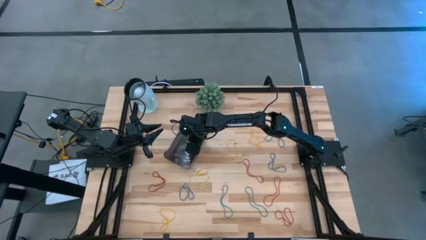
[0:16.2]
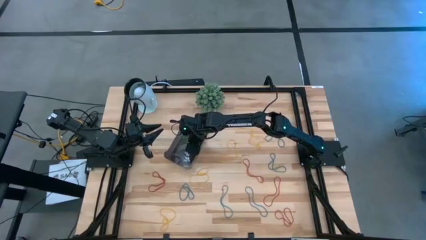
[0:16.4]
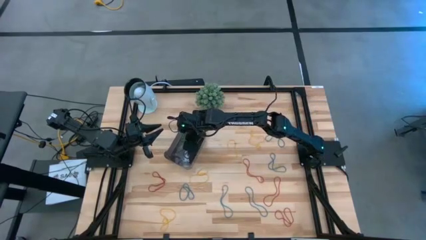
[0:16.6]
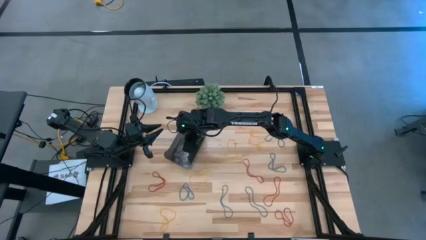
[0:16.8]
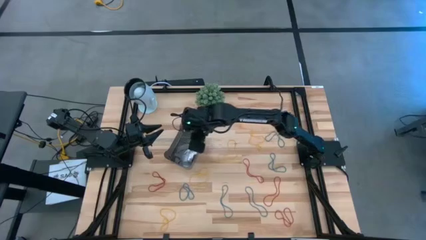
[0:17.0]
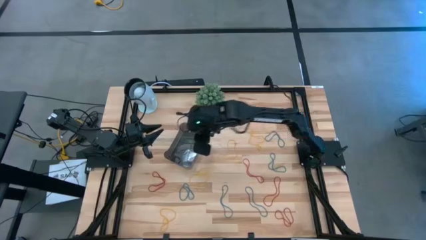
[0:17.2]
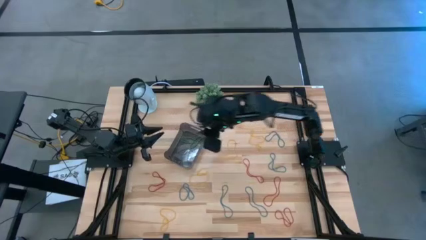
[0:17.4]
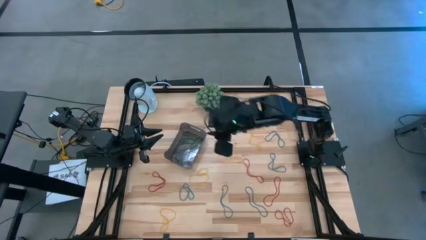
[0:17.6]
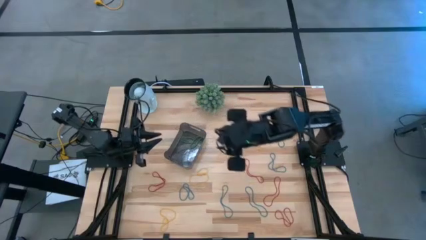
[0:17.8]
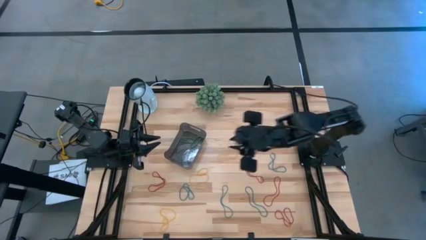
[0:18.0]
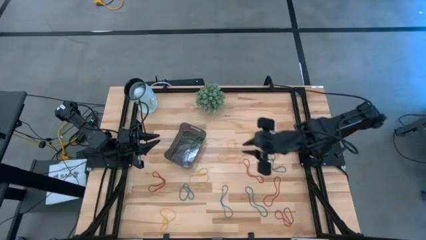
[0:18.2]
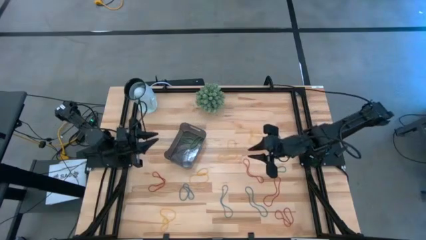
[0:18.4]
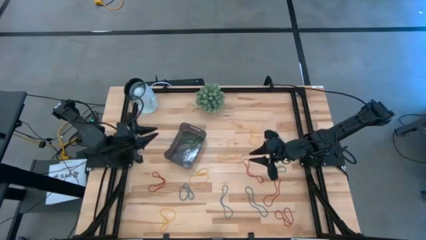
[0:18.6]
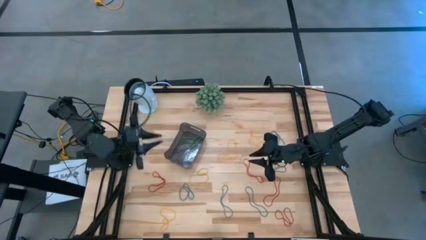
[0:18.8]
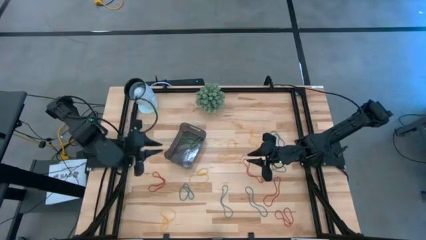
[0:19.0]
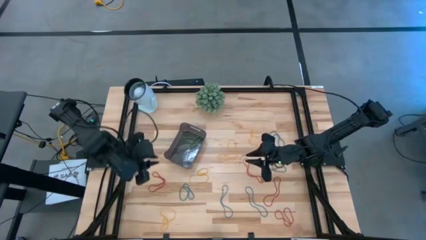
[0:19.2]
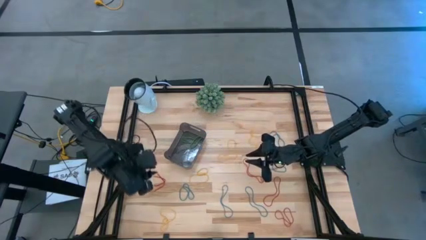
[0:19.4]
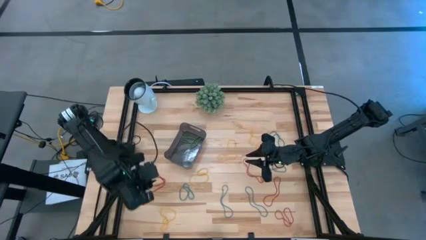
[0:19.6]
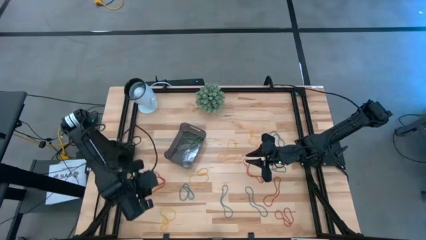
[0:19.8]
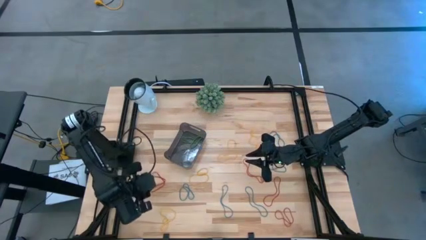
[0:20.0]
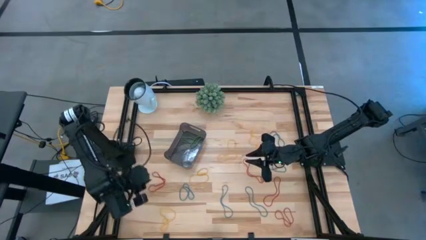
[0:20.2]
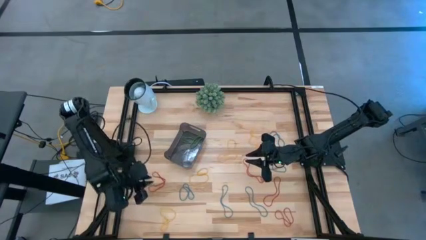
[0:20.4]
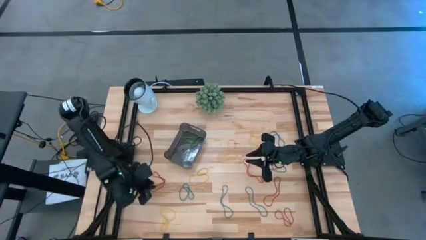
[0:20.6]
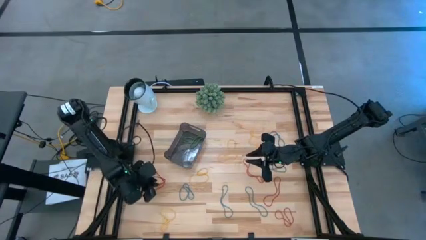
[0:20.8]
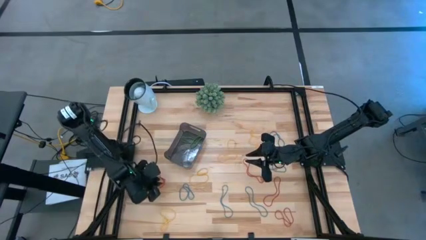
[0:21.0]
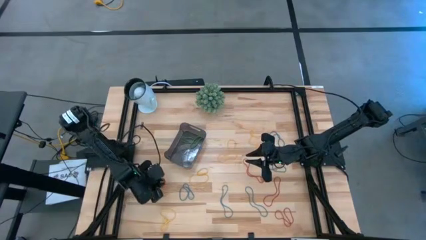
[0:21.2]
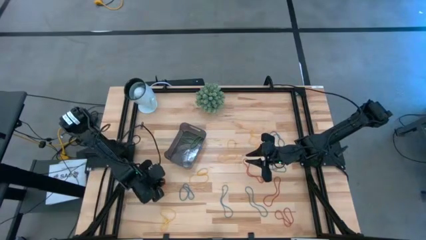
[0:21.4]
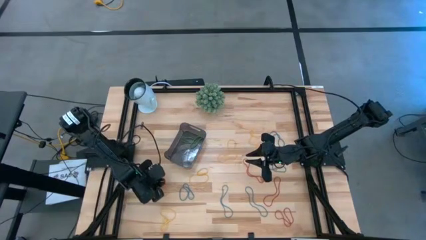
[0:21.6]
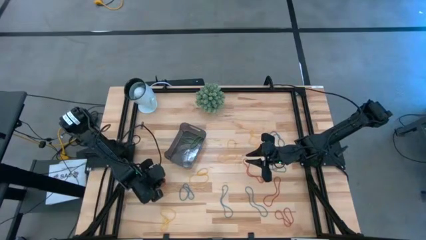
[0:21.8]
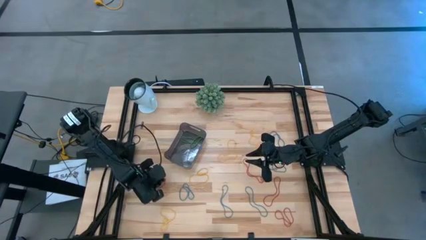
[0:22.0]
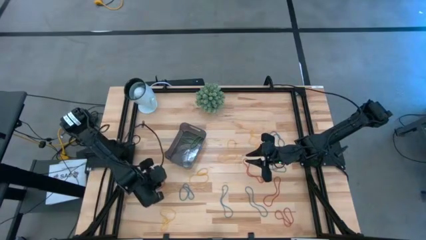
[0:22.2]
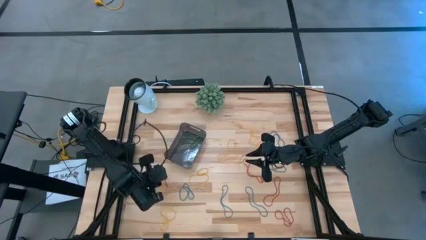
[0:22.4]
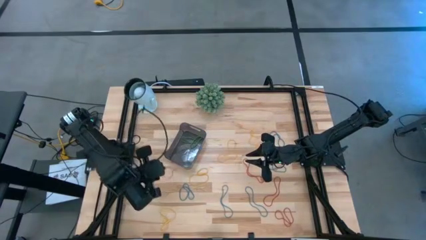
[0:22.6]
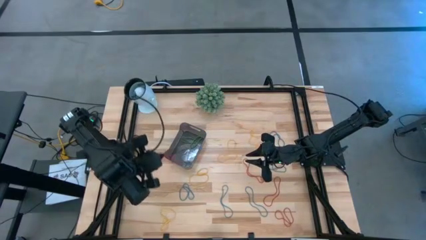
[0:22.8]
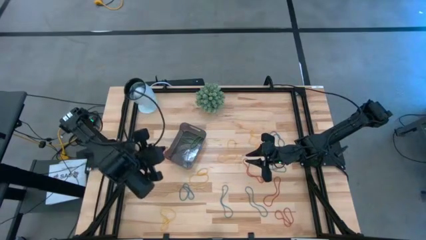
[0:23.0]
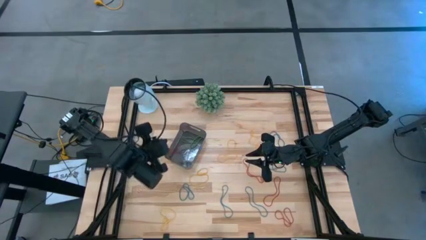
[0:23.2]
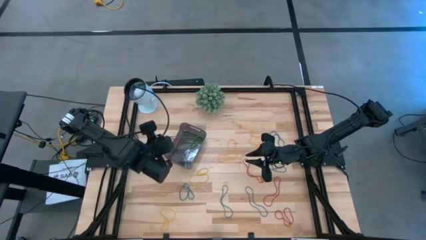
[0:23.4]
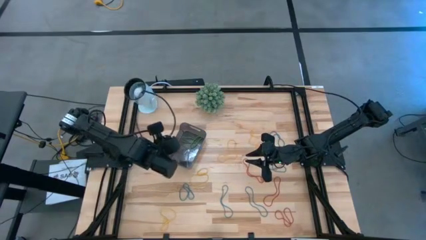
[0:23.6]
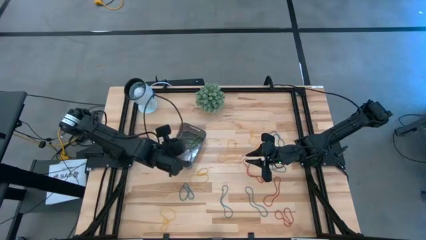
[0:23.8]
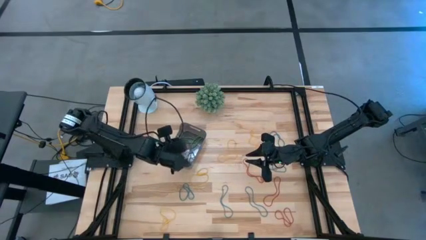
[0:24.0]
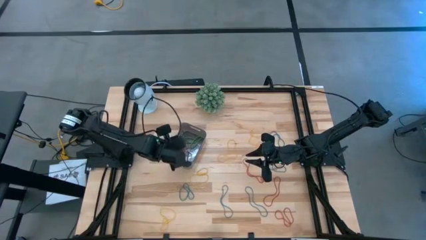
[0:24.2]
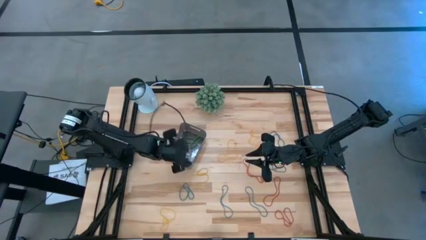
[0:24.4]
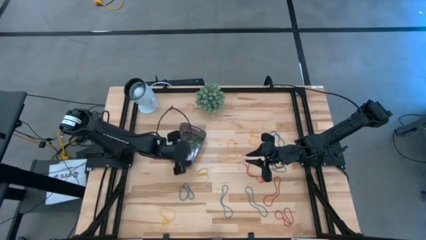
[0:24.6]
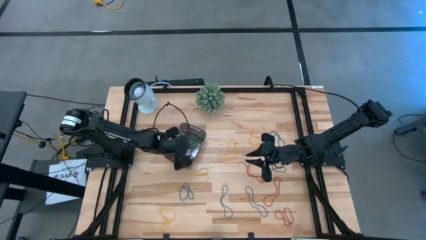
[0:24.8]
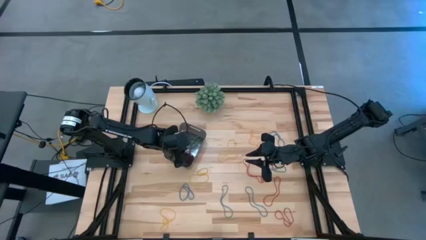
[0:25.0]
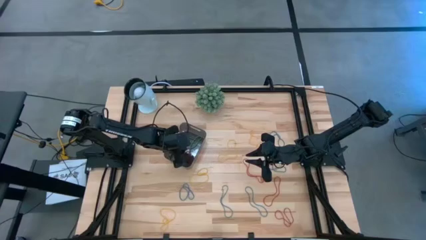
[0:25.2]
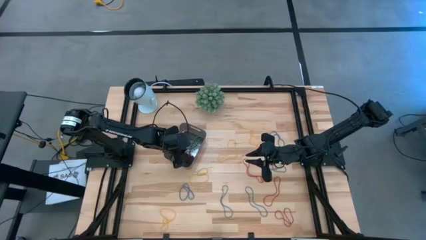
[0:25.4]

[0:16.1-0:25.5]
Task: Pick and place items into bin
Put the red rubber band into the black bin

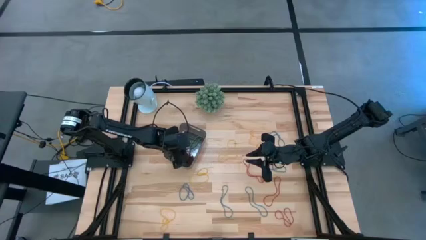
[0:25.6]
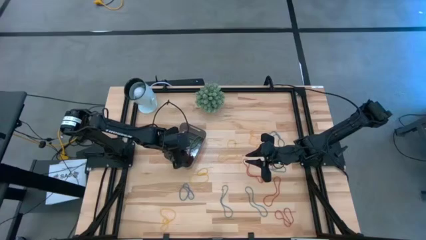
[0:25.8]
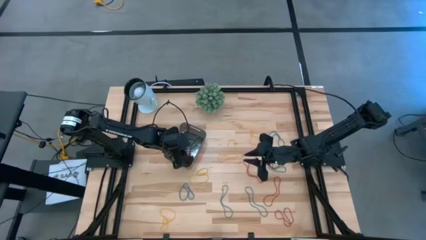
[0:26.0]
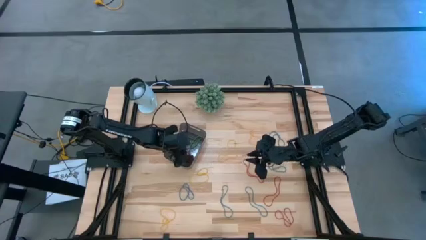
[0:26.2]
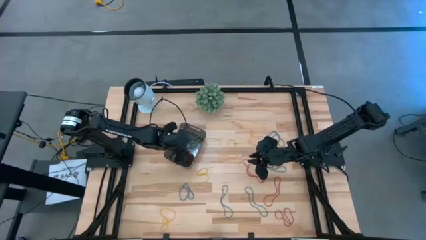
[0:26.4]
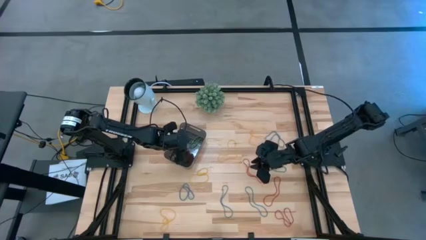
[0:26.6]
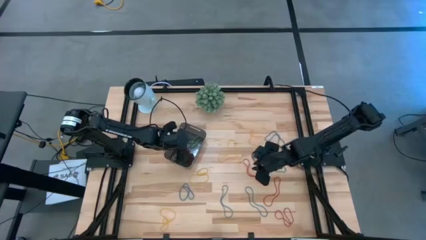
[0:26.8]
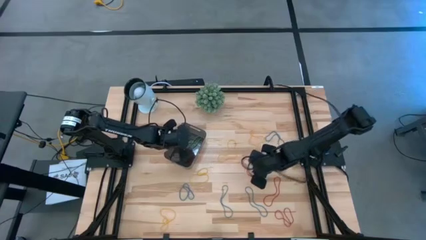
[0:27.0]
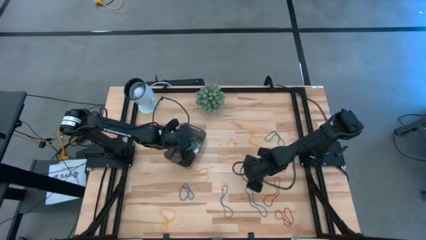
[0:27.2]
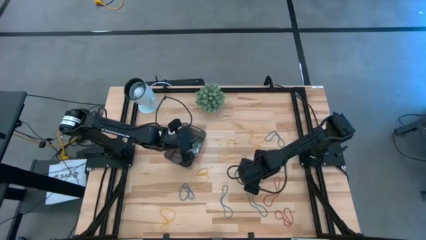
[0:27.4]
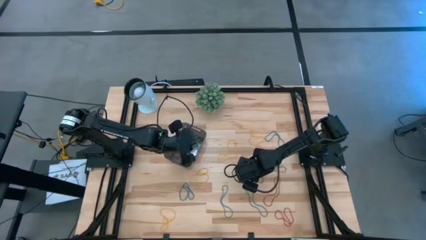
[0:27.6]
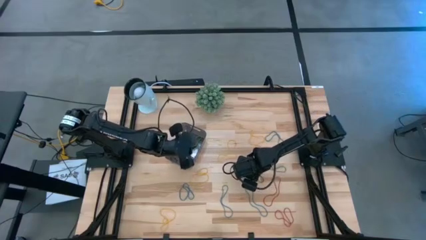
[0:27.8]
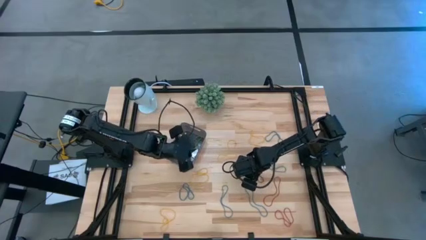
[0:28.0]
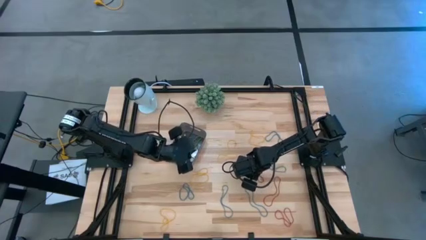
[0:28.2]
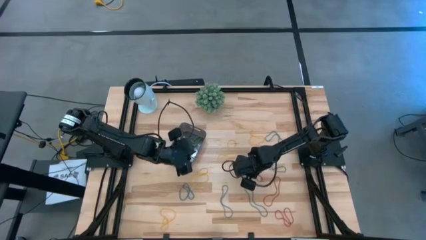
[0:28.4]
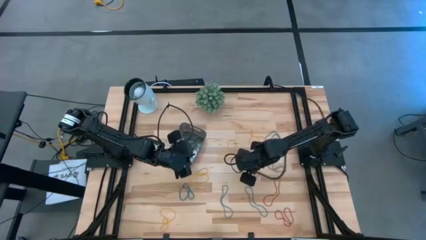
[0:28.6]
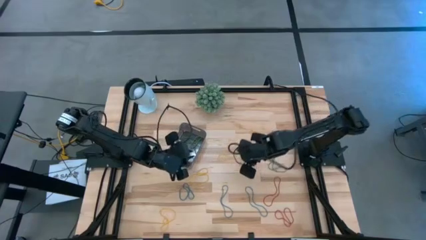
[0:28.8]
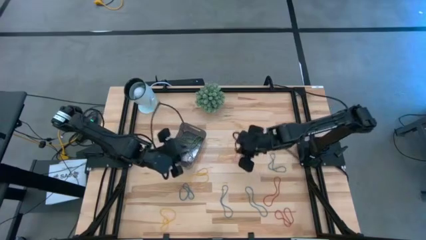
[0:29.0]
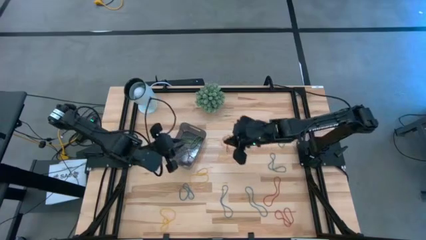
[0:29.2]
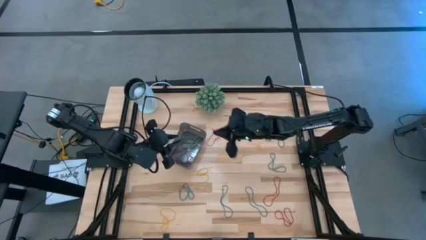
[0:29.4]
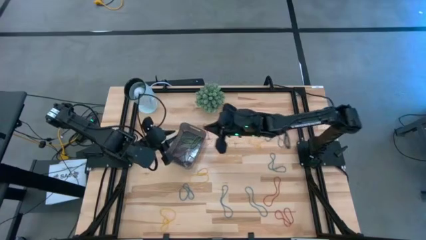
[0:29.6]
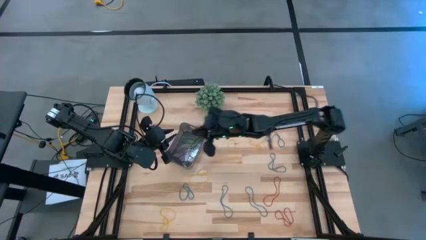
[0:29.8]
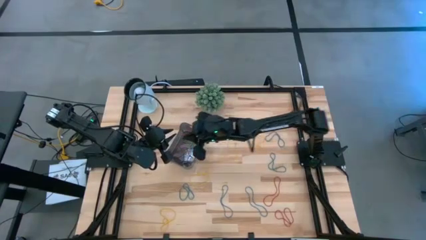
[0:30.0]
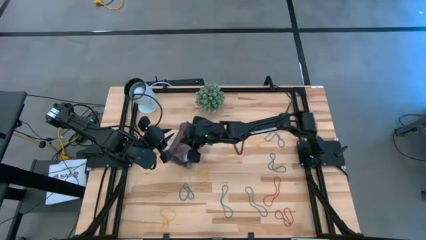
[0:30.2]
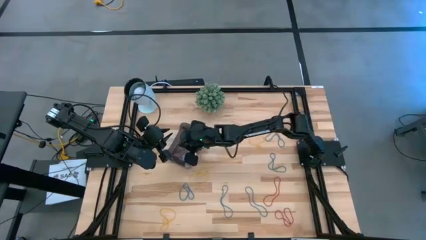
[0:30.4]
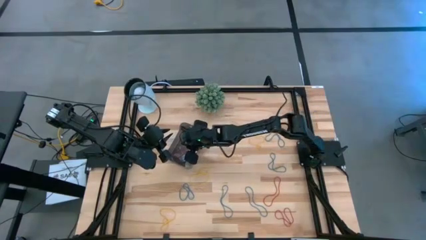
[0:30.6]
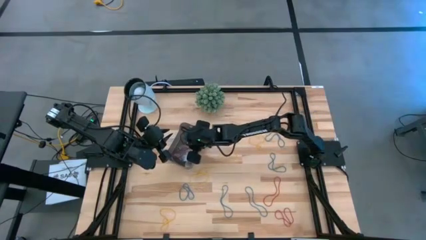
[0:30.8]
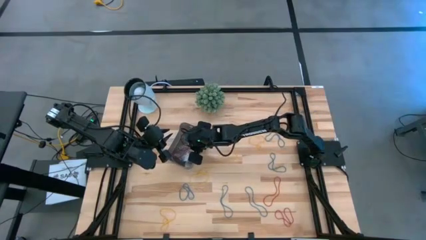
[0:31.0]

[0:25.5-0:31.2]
Put the red rubber band into the black bin

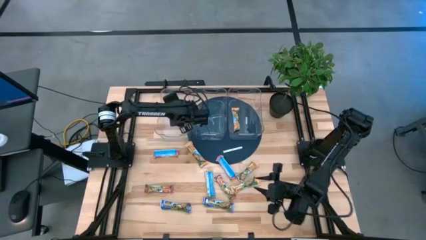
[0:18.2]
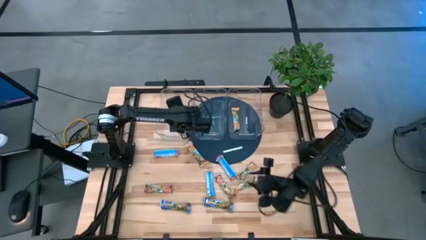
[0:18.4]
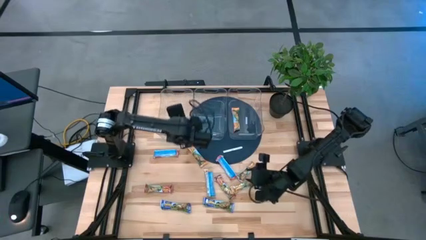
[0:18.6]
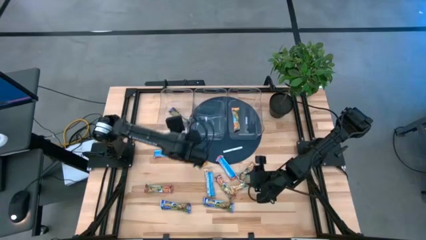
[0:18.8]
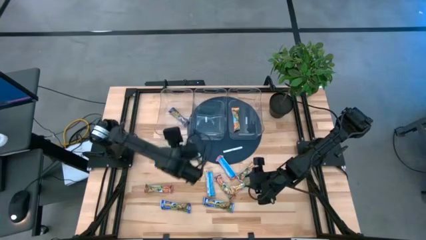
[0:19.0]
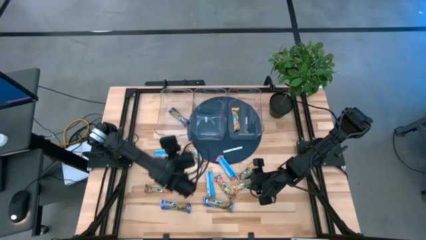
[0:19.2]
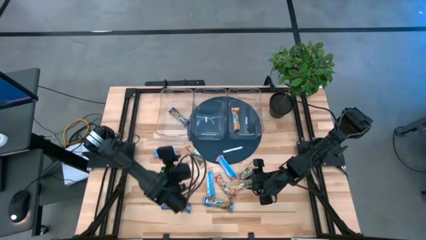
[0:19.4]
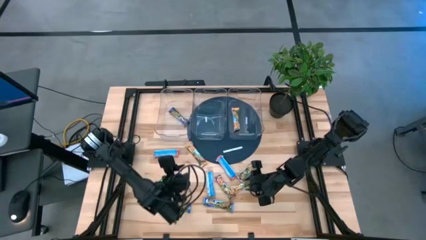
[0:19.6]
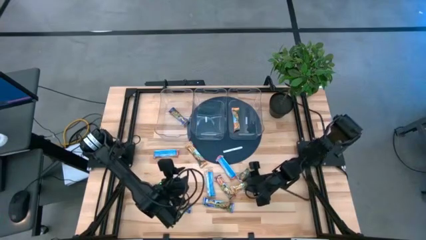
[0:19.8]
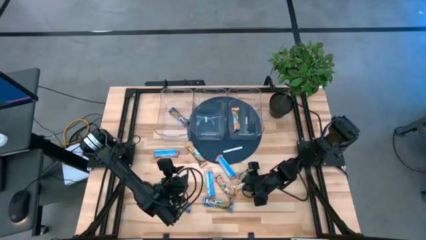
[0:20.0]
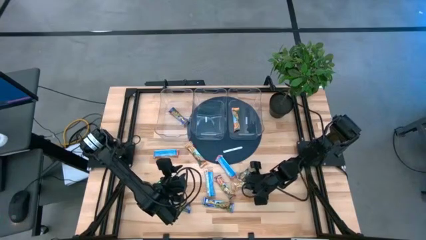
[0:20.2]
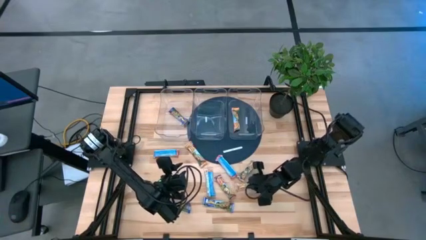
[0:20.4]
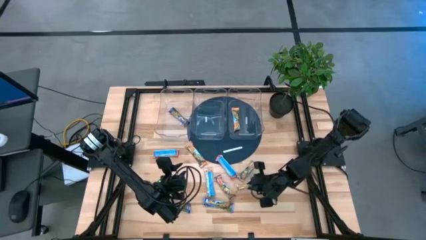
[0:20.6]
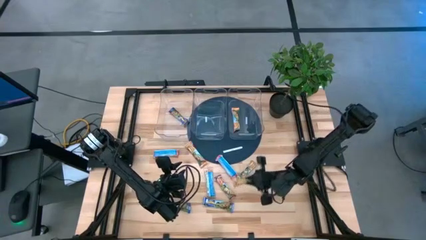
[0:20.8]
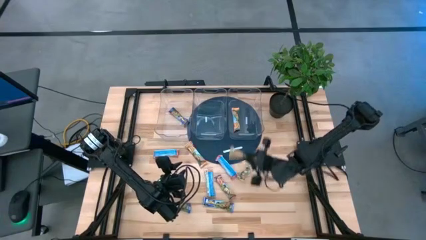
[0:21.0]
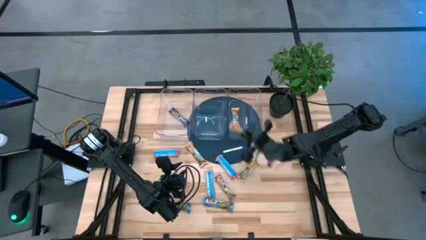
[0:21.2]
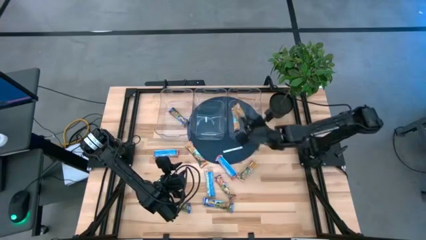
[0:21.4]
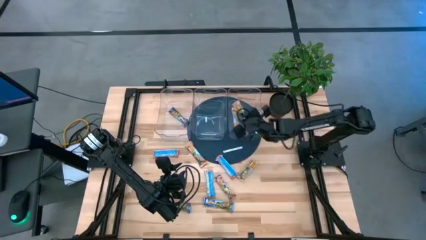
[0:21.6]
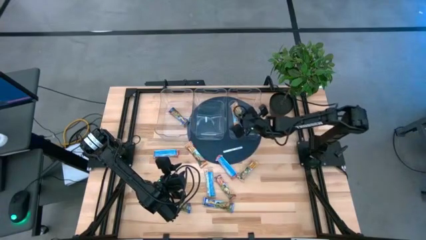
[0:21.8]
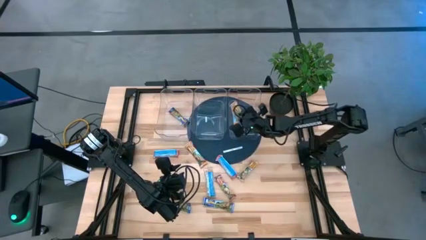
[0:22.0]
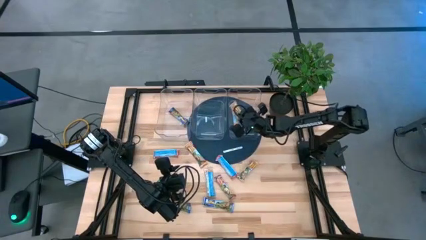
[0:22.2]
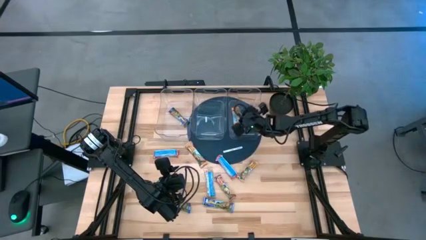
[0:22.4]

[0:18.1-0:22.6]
Task: Pick and place Granola Bars by type
Put the orange granola bar into the right transparent bin
